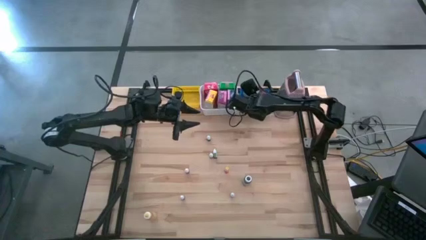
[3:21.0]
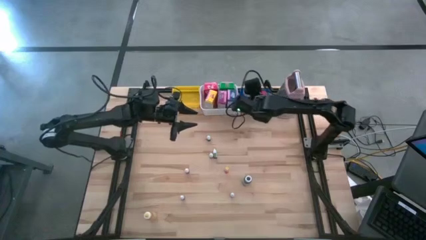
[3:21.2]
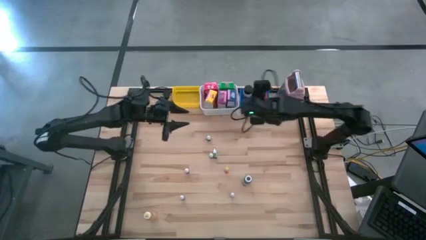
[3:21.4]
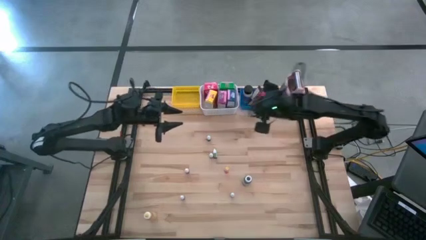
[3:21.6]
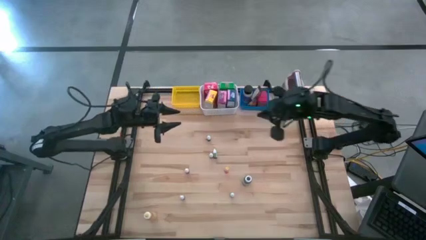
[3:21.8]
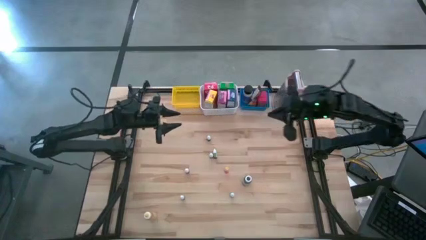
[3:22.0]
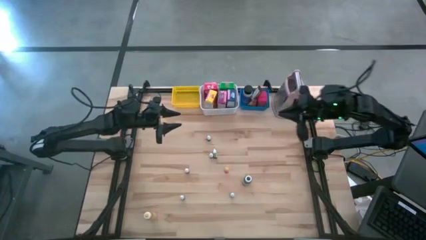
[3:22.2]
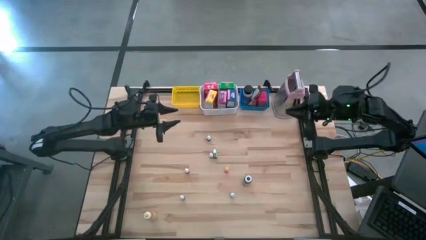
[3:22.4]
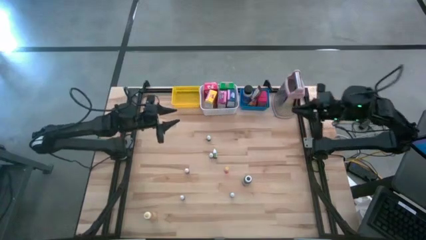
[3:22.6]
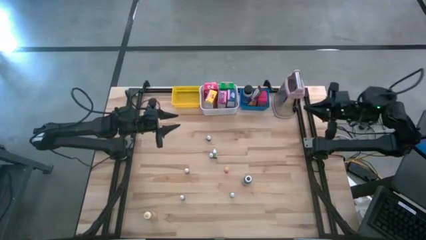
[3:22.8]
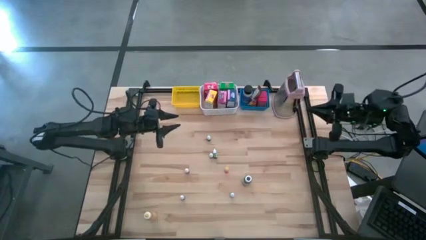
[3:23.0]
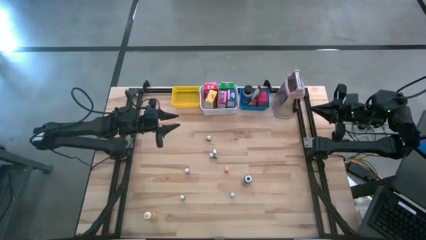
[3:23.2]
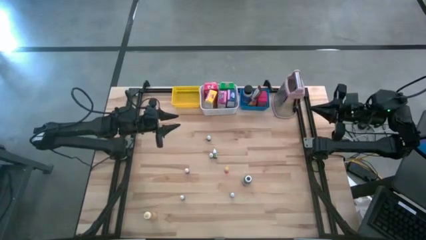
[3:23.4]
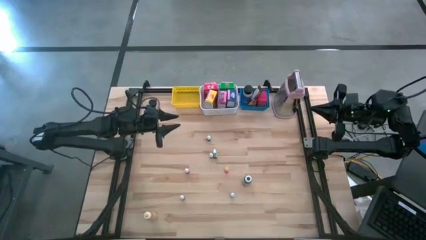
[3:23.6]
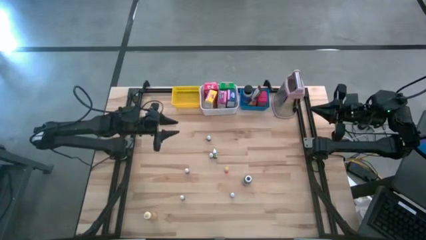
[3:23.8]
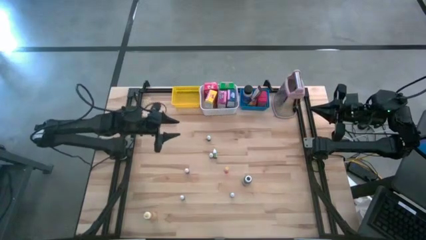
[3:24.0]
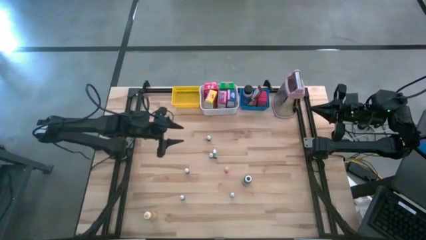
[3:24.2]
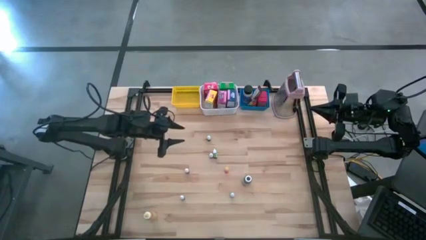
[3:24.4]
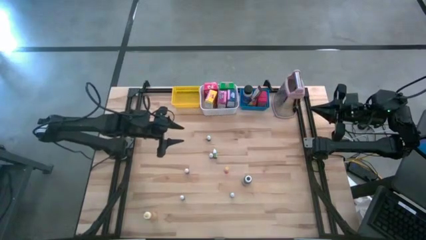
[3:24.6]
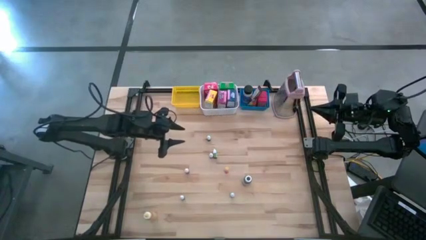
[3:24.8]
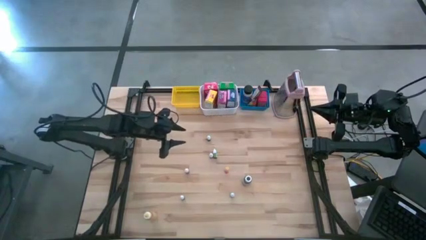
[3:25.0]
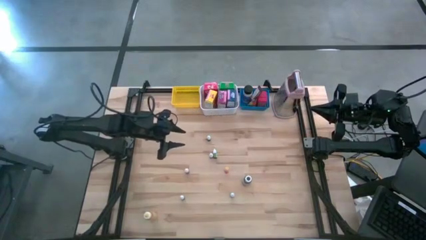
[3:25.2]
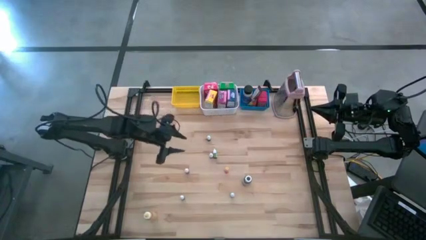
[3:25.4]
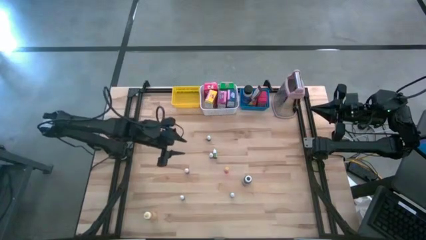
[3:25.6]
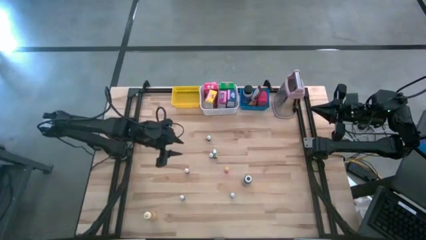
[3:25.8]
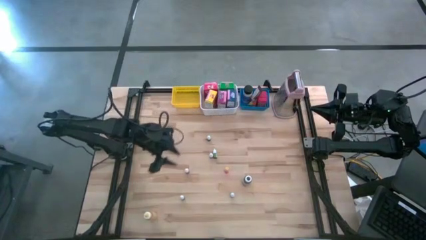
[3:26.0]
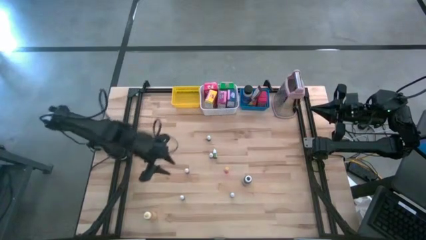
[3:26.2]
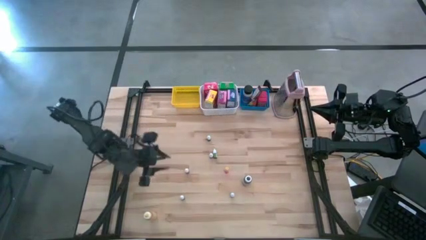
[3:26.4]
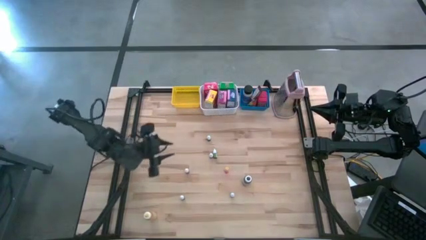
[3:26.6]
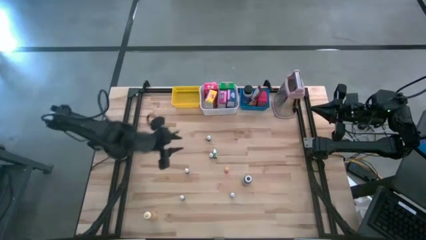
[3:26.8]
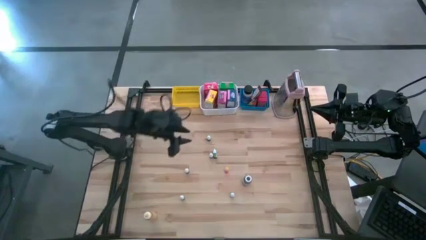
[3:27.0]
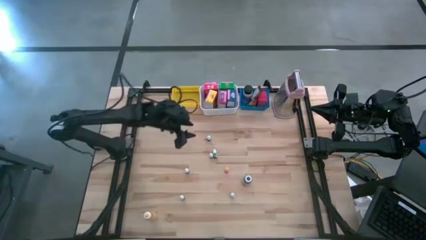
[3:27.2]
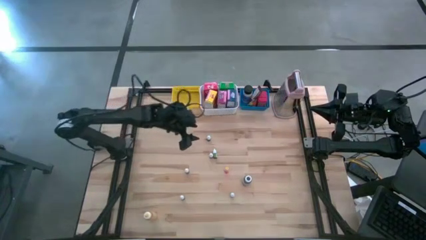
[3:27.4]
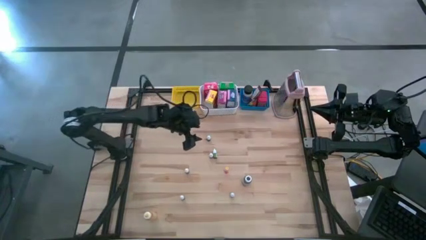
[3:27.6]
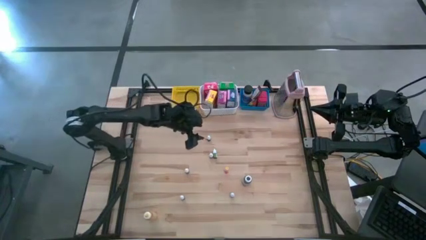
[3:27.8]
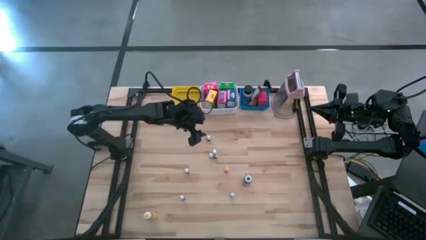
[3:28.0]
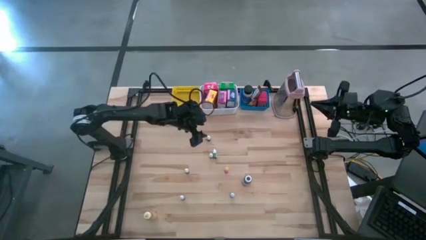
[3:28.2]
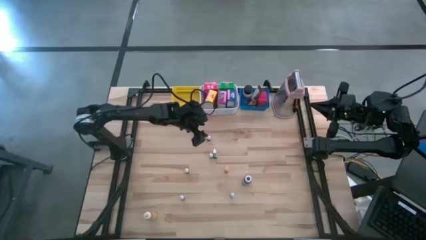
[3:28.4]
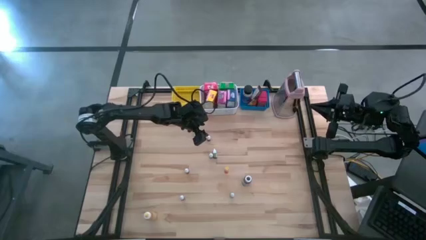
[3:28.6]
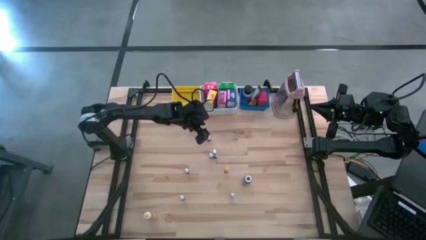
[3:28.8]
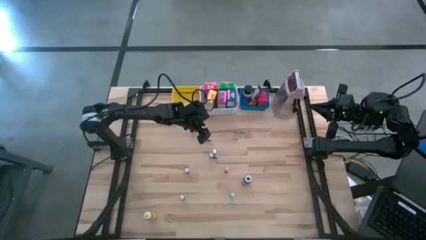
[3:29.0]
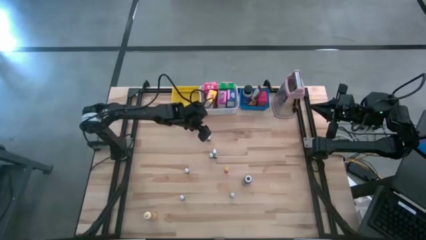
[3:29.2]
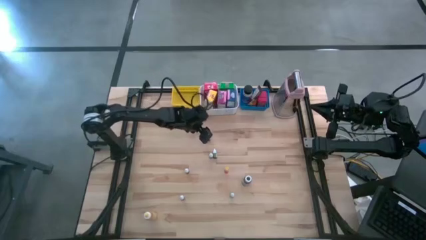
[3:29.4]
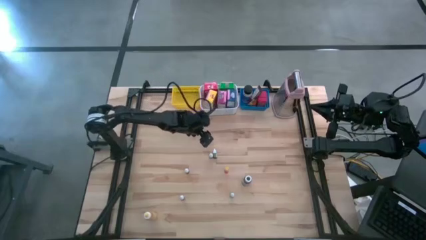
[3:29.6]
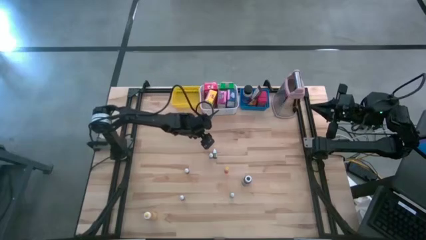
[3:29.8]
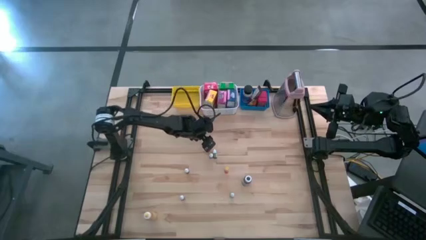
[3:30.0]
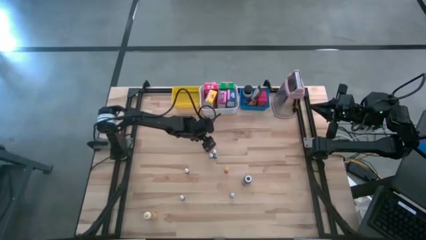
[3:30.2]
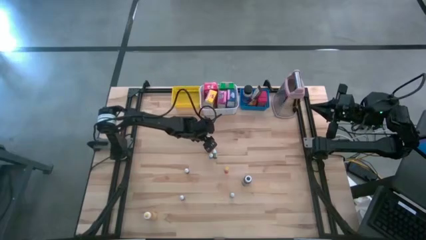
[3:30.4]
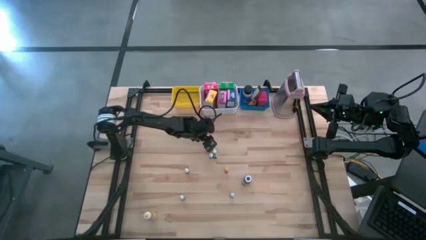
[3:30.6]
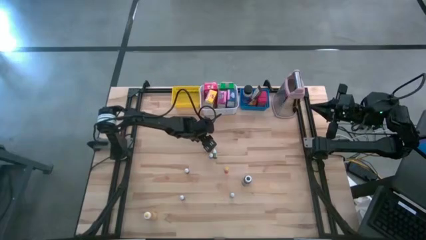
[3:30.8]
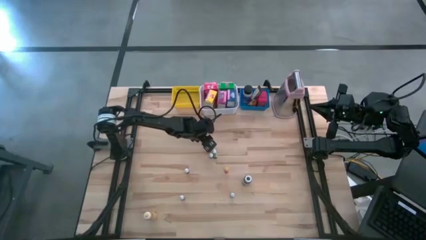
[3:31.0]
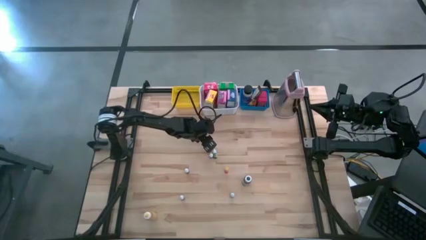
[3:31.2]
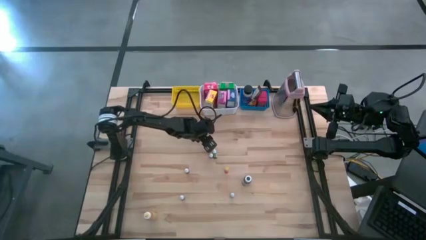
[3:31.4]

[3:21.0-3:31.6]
Task: Pick & Place Kitchen Items
Put the black food coloring bottle into the yellow basket

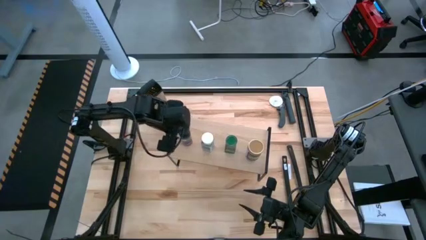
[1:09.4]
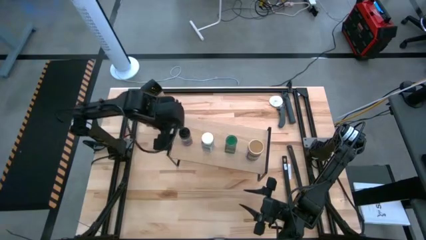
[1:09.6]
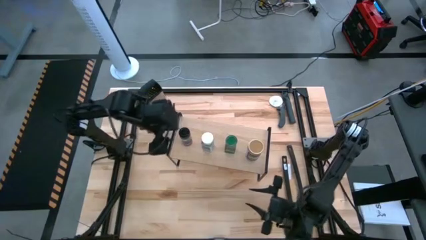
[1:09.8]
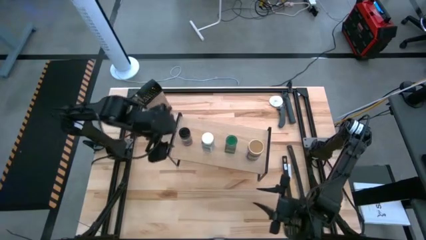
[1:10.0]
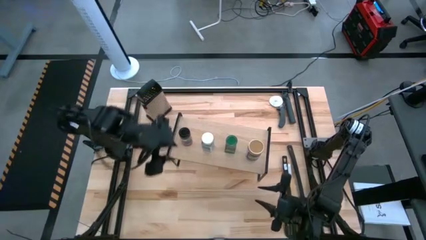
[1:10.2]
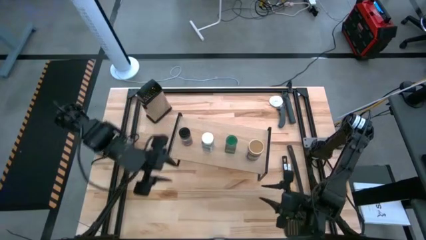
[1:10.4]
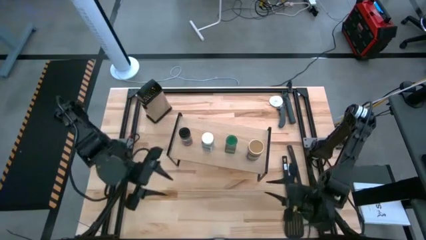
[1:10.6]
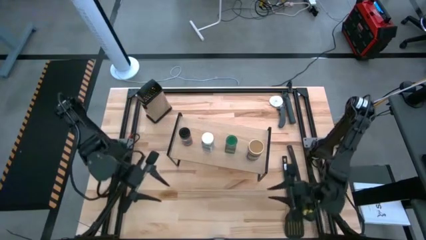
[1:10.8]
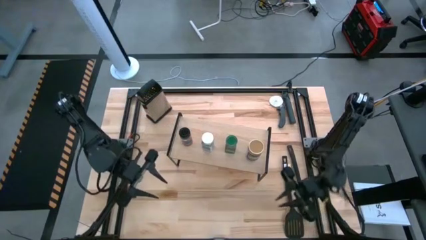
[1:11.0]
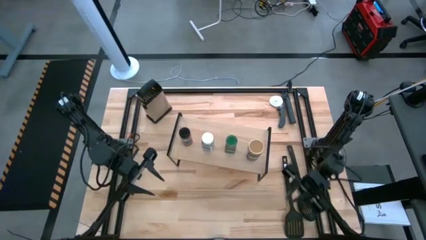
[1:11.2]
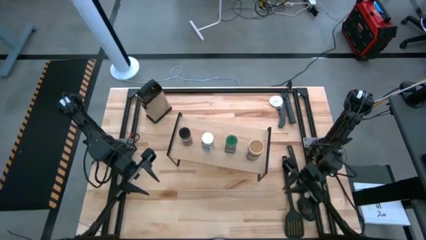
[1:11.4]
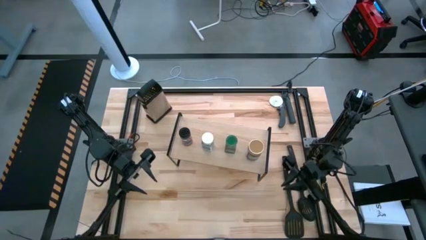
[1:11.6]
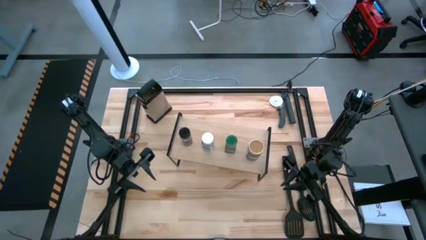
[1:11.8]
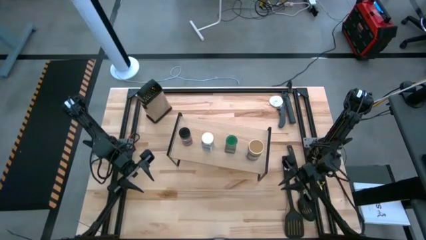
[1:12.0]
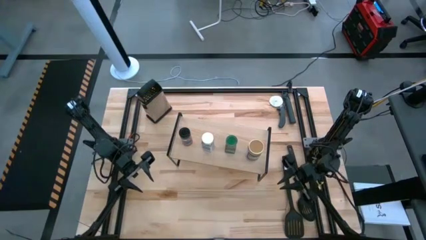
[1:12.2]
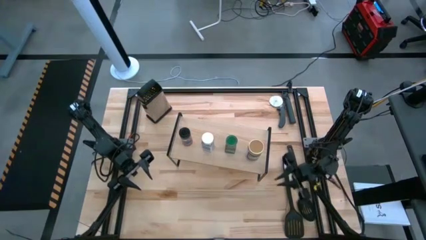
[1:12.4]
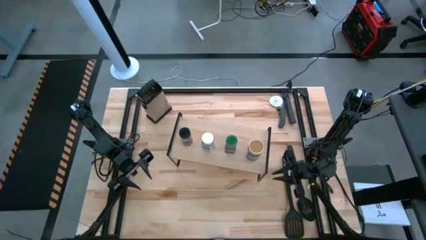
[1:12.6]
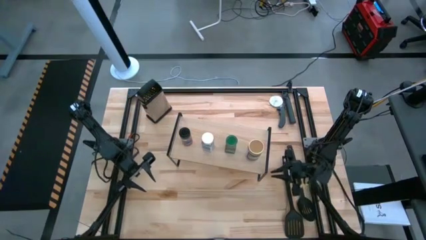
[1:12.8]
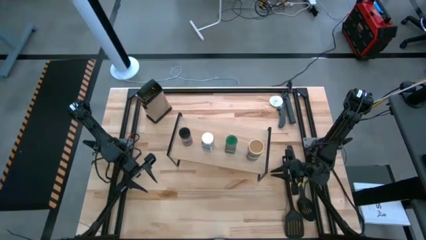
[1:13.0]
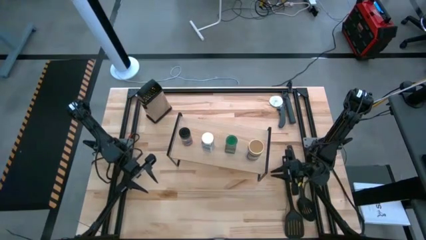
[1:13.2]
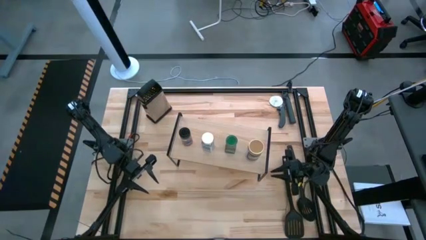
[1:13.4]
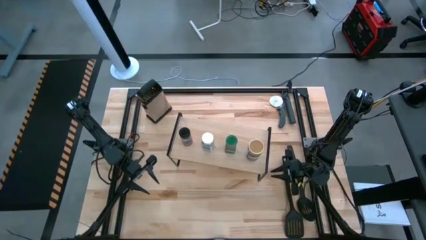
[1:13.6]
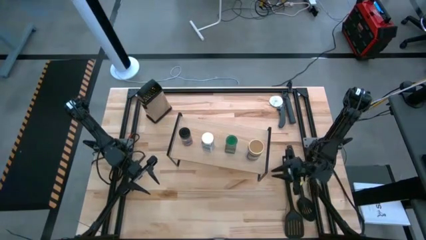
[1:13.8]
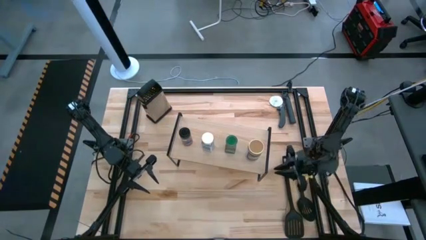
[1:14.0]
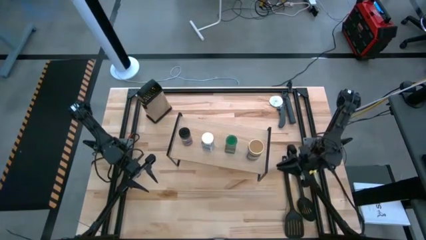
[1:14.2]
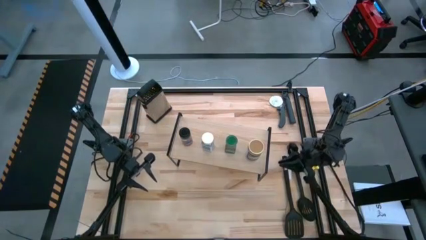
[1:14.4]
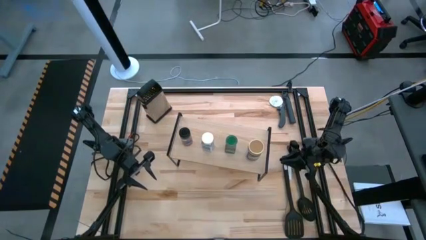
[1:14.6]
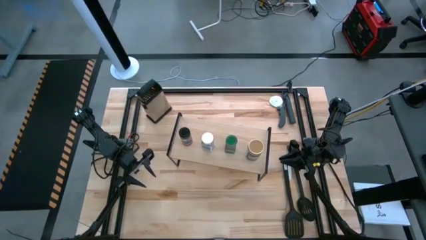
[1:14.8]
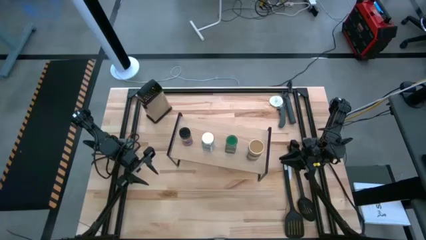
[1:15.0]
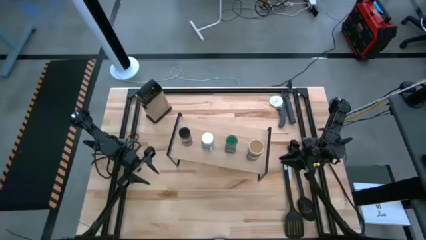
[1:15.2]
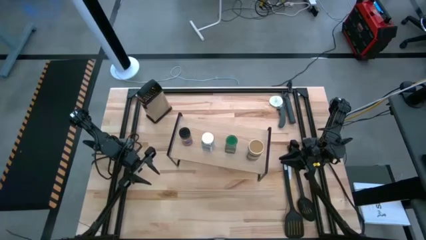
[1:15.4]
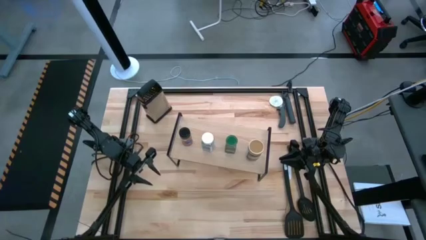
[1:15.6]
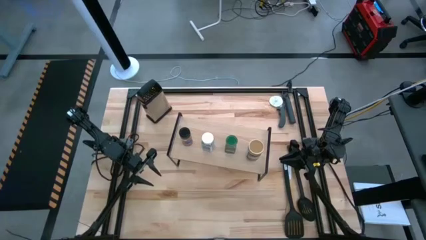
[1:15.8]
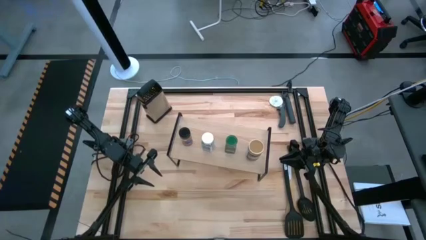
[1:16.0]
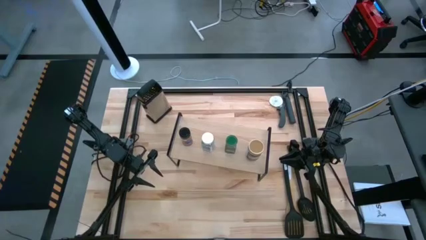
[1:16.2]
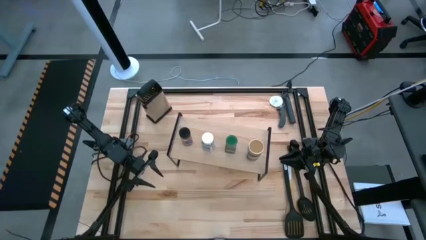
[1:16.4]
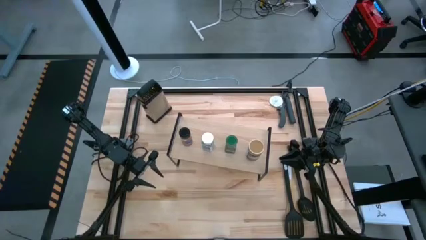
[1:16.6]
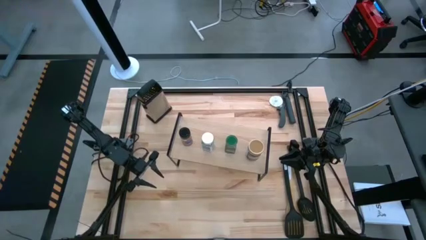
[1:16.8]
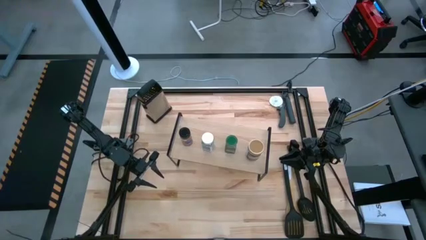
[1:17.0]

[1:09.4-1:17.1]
Task: Shelf spices
Return to Home Position
